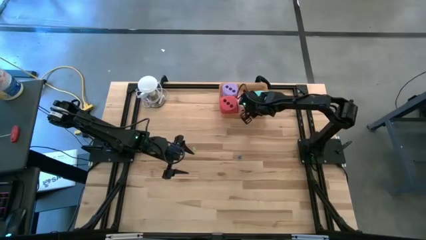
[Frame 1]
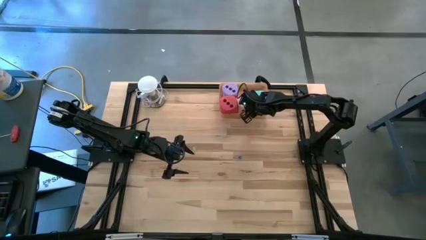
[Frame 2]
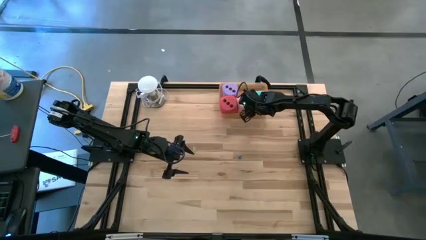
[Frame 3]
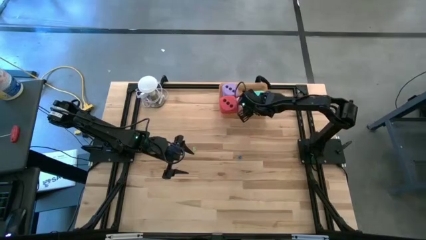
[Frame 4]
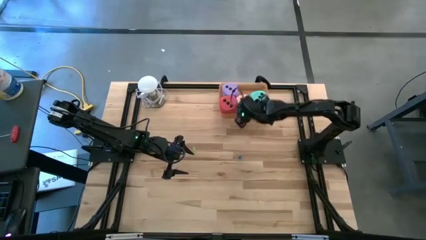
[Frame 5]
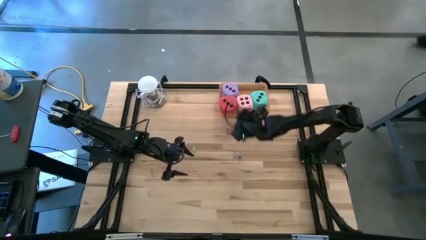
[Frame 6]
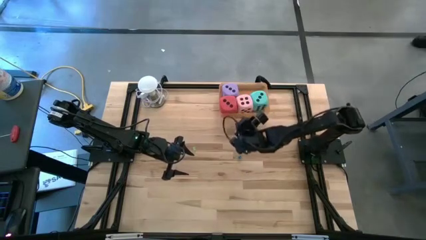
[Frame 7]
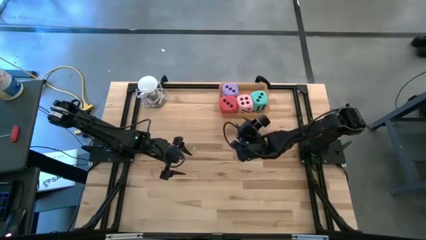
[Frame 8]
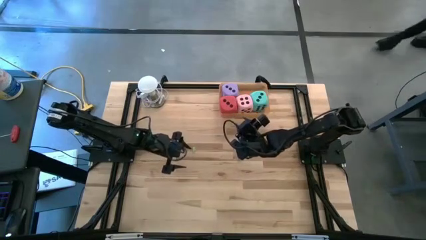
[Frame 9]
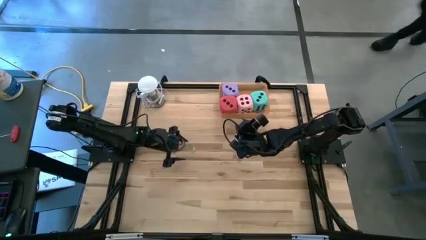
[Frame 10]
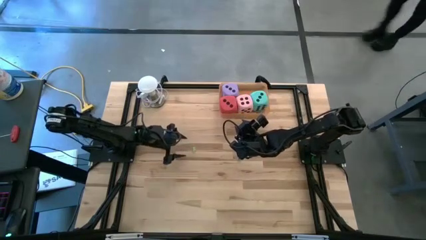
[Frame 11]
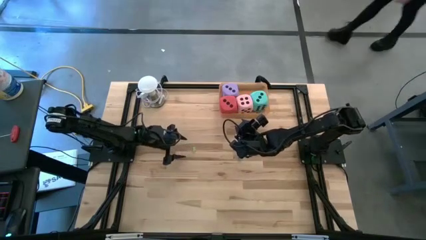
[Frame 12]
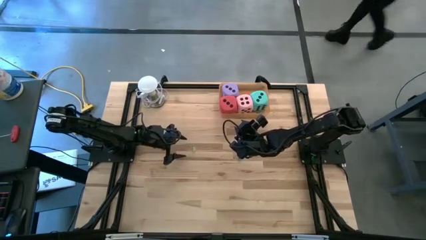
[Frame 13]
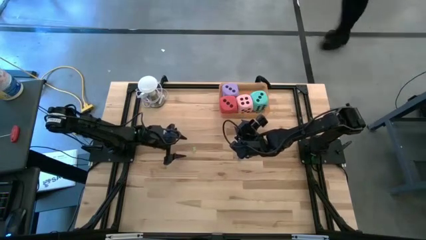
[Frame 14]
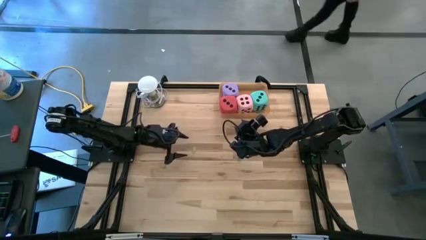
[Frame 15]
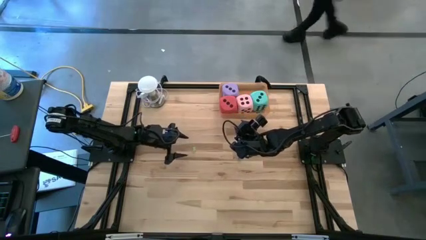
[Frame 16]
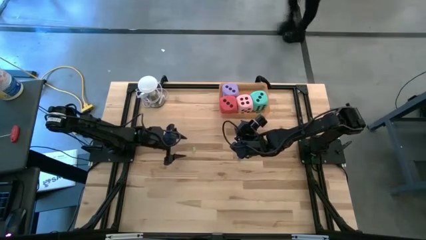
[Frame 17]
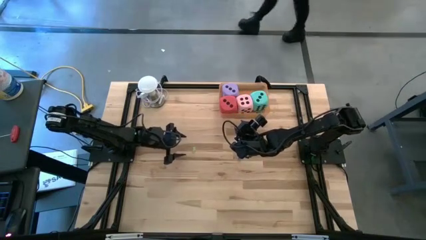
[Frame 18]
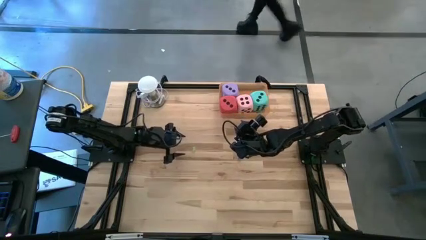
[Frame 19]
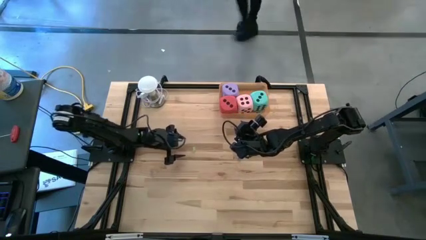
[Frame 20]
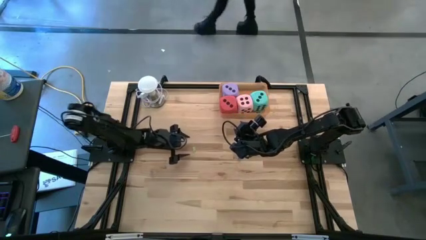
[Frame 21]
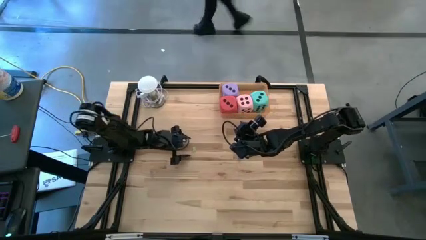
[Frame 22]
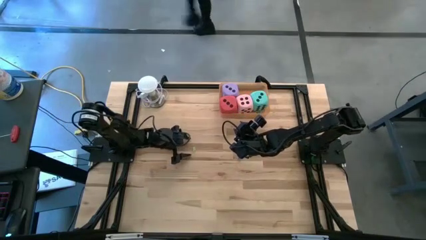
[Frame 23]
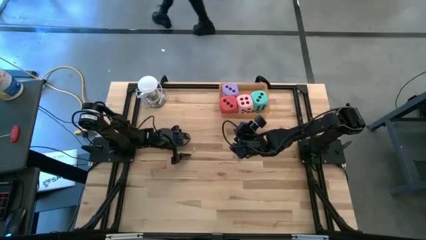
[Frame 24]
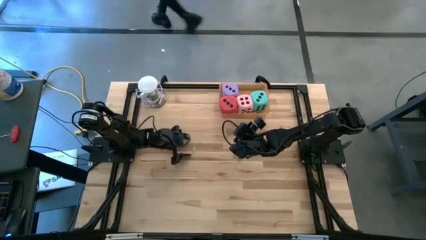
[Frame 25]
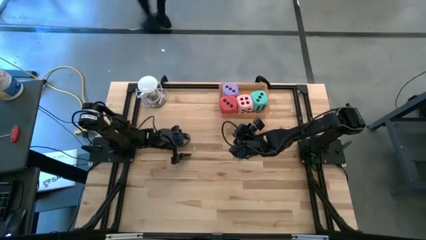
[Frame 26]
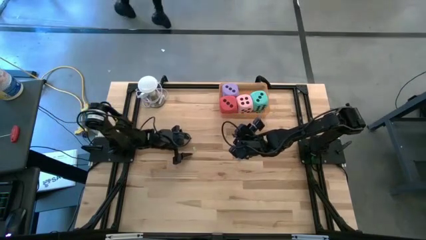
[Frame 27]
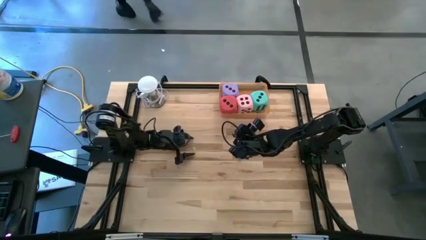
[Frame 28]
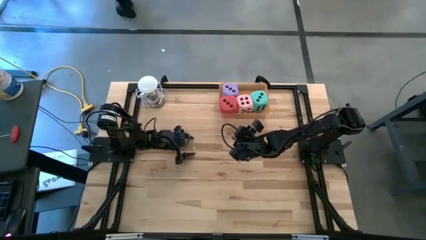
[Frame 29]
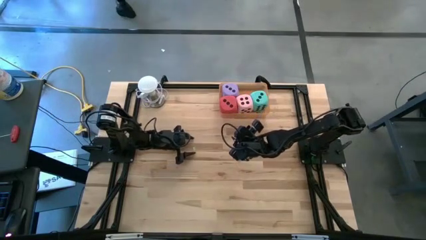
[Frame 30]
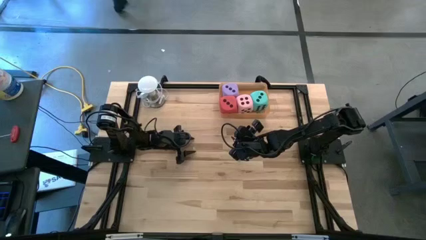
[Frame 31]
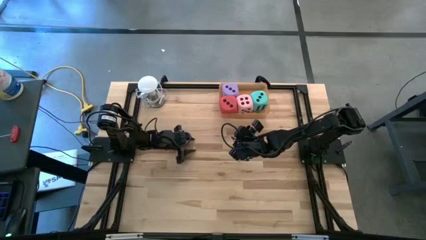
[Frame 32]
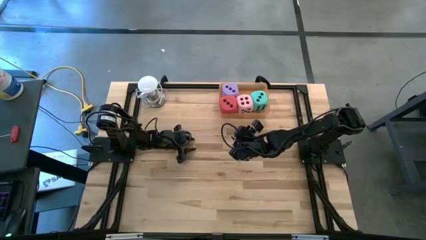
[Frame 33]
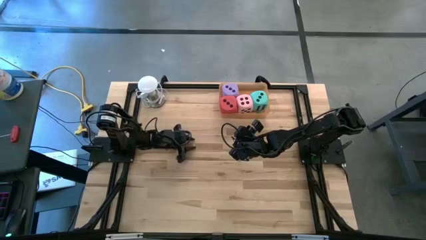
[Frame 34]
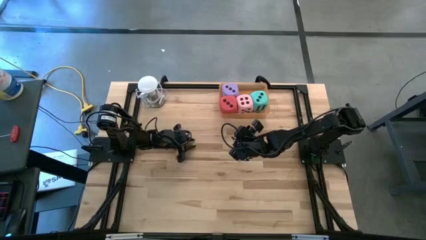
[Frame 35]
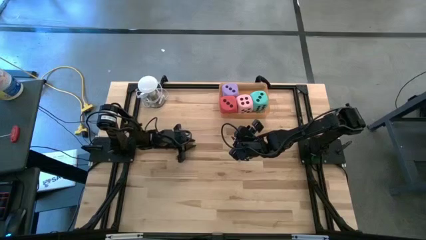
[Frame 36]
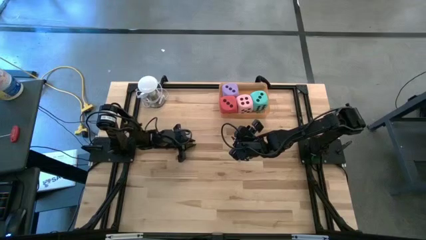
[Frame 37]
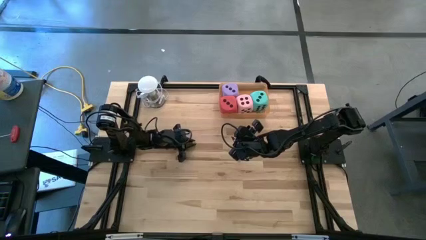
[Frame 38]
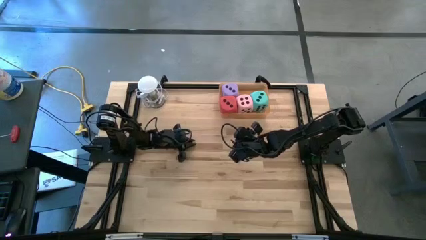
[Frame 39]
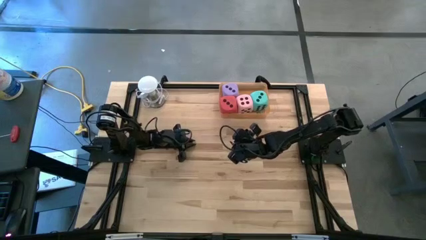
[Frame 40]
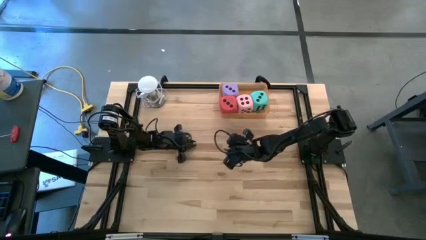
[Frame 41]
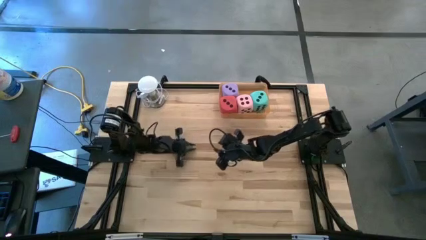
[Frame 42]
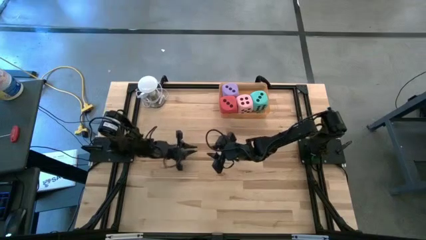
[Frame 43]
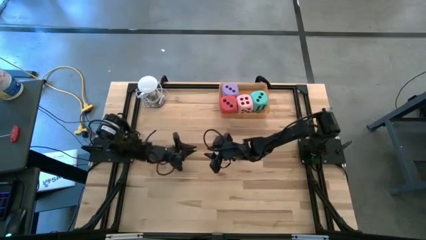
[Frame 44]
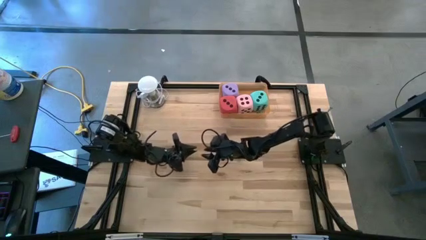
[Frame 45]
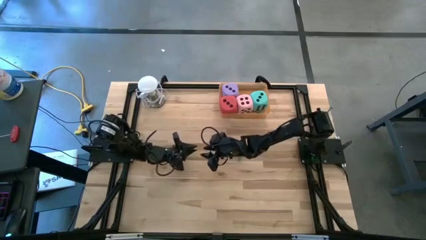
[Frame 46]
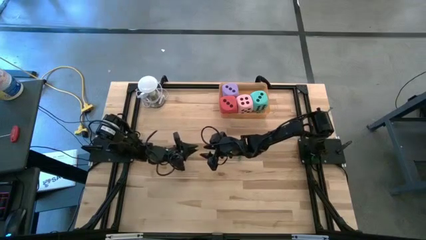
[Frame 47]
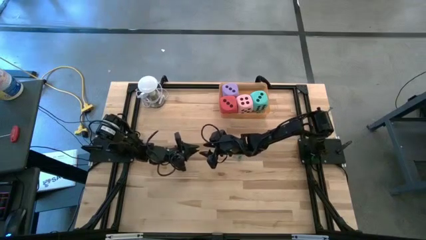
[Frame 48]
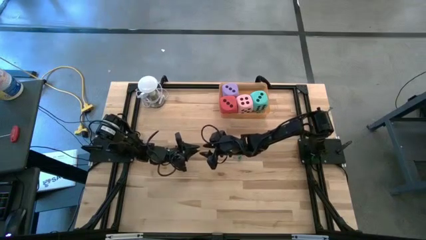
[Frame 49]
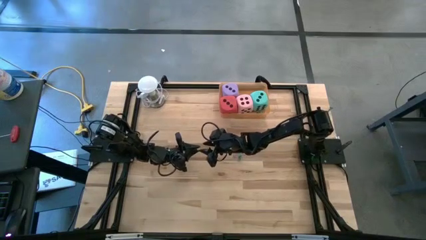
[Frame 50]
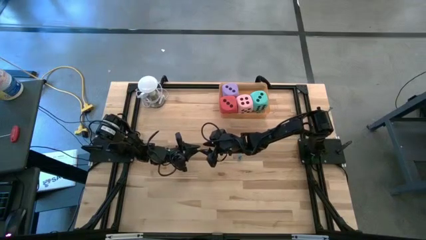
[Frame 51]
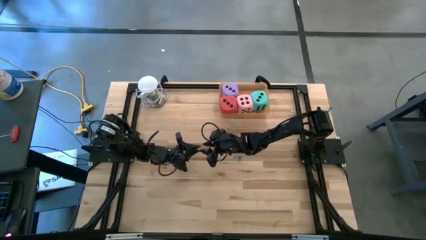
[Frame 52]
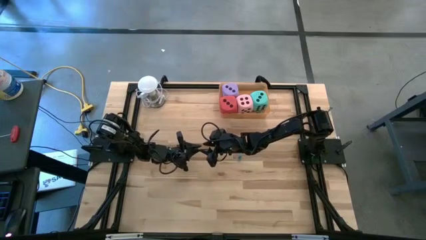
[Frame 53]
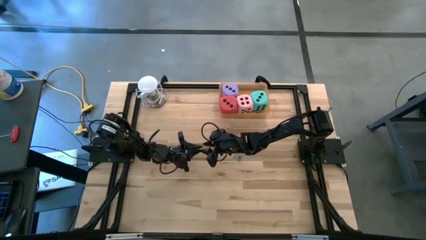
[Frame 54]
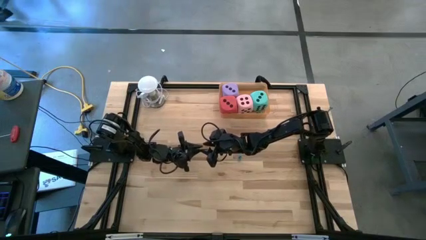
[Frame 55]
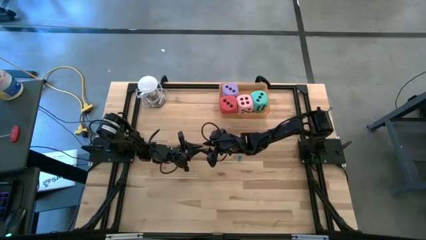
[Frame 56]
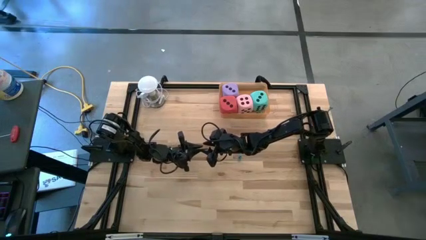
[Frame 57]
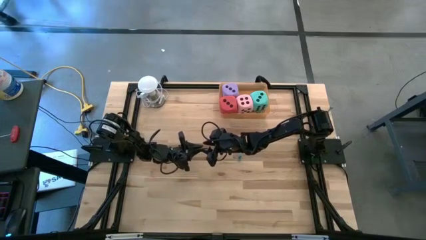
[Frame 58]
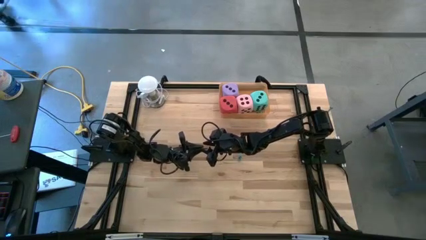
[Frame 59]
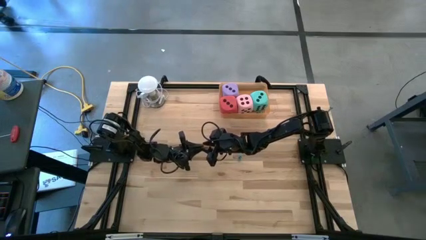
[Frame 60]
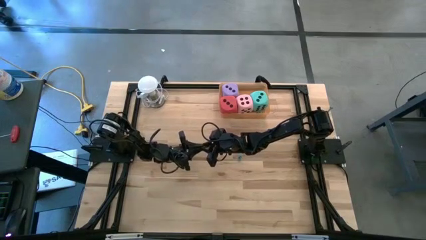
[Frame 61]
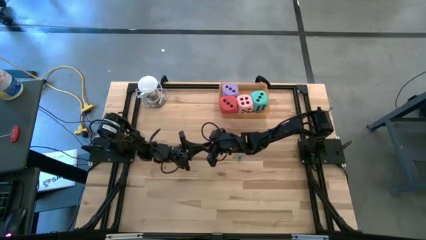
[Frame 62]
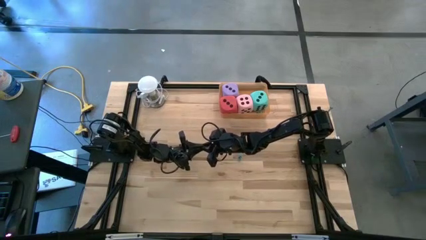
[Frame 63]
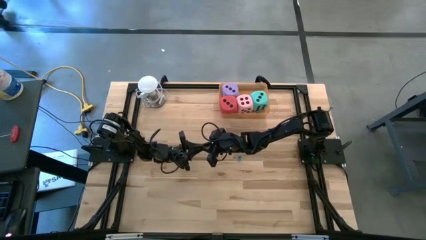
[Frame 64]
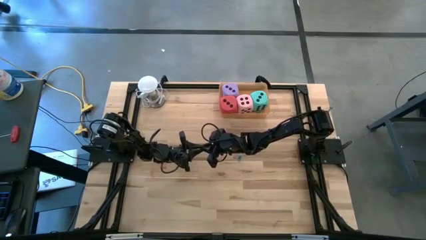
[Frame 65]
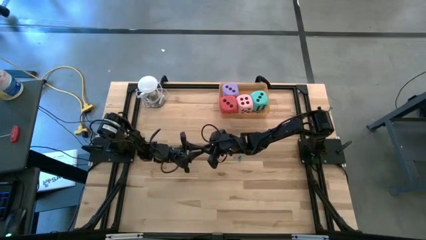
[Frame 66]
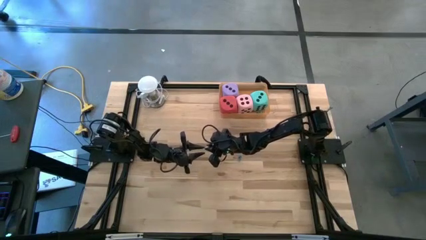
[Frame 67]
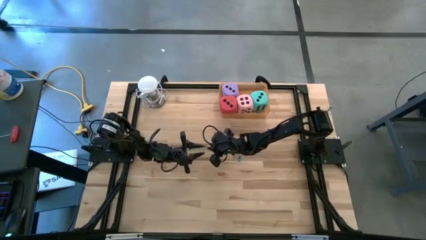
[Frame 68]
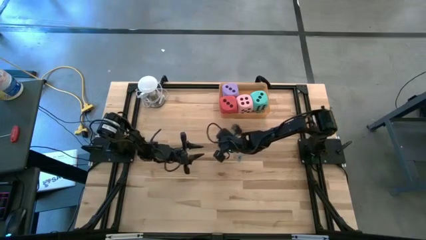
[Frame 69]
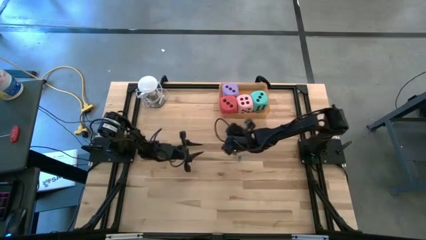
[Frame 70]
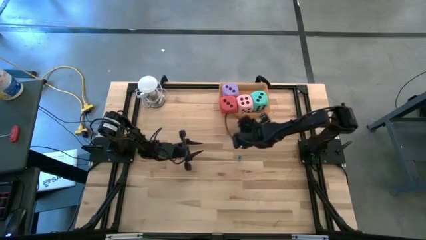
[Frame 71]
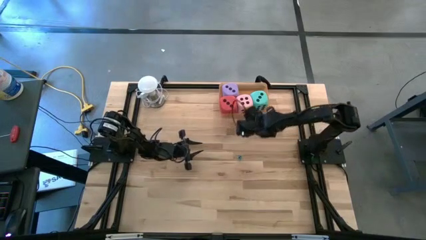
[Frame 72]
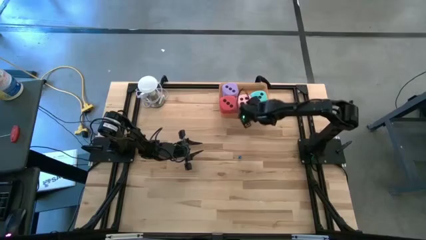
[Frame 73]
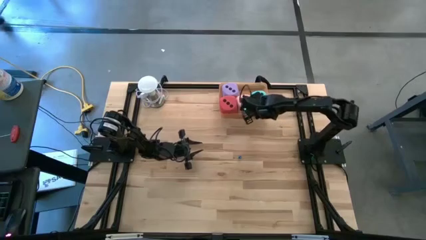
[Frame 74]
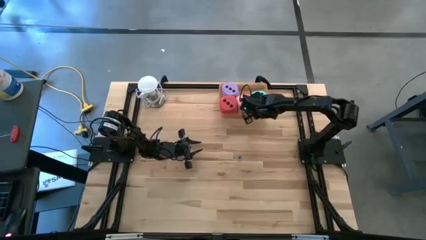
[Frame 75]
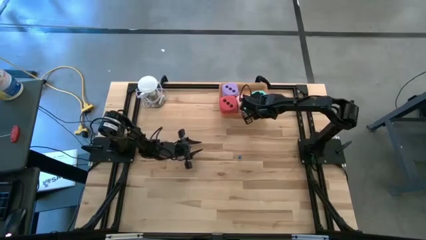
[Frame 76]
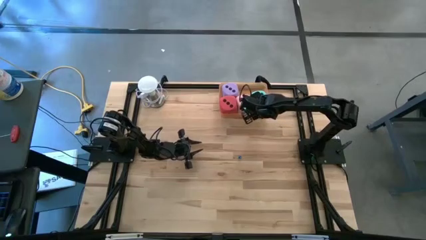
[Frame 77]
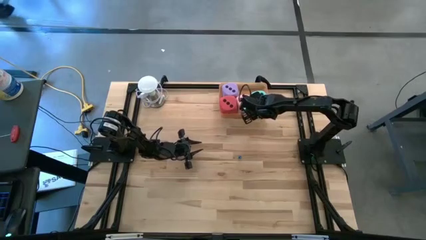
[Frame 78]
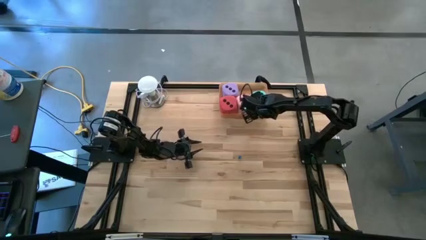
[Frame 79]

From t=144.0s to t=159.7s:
Task: Pick & Place Dice
Put the small green die into the orange bin
